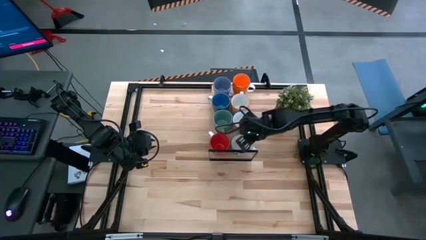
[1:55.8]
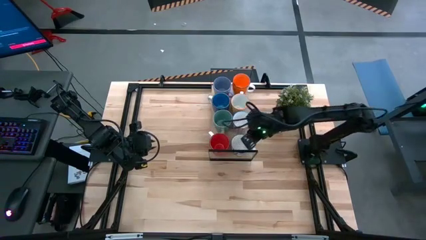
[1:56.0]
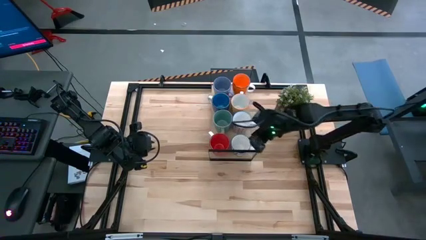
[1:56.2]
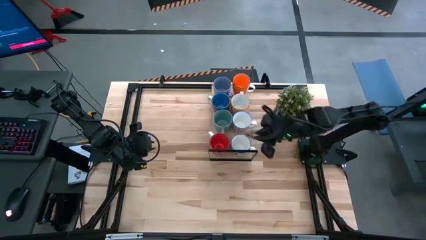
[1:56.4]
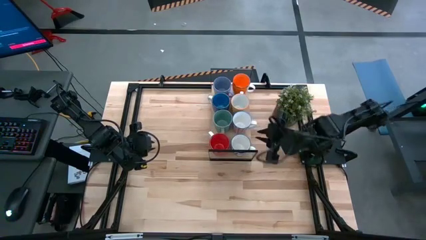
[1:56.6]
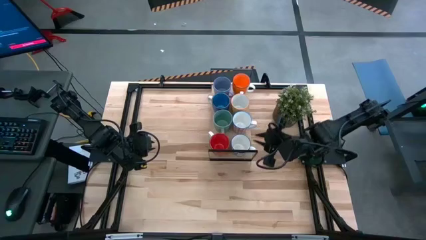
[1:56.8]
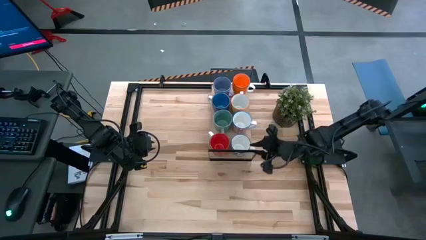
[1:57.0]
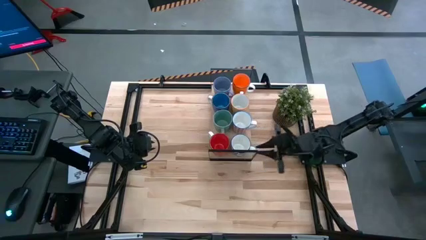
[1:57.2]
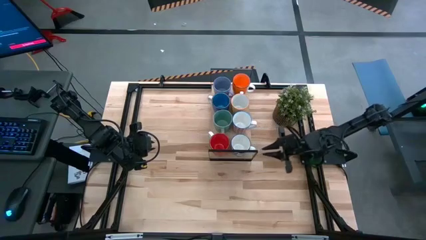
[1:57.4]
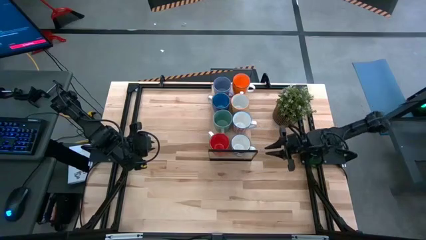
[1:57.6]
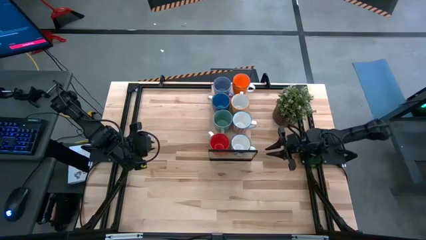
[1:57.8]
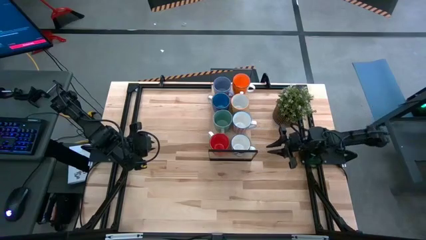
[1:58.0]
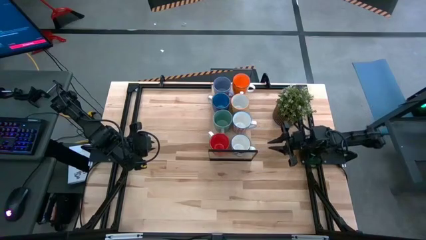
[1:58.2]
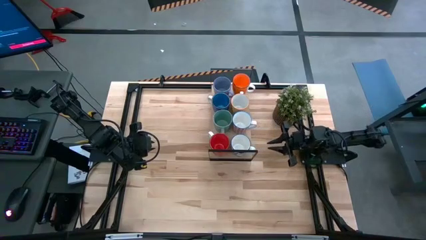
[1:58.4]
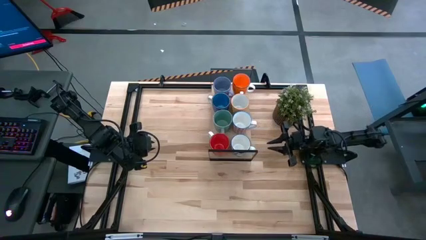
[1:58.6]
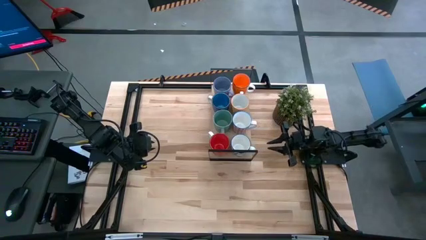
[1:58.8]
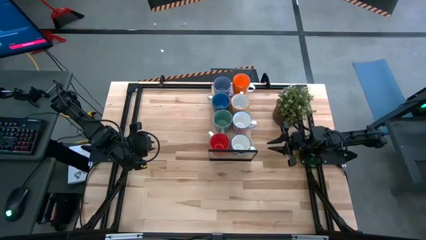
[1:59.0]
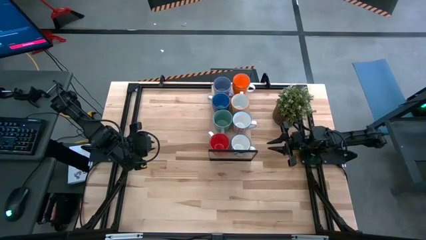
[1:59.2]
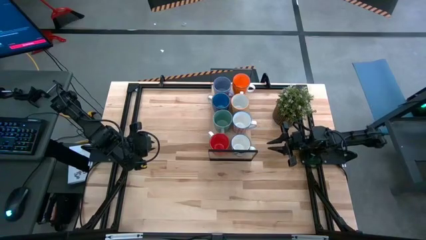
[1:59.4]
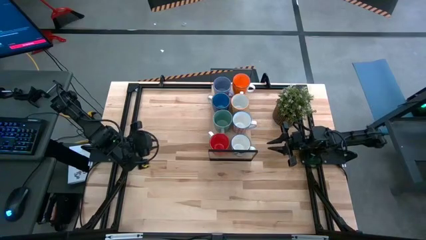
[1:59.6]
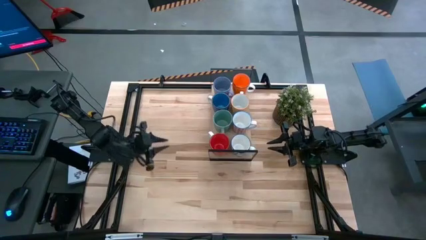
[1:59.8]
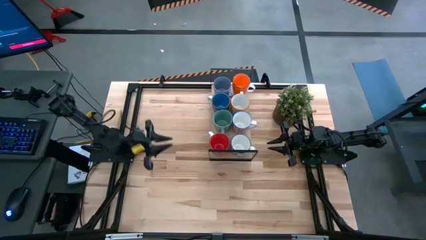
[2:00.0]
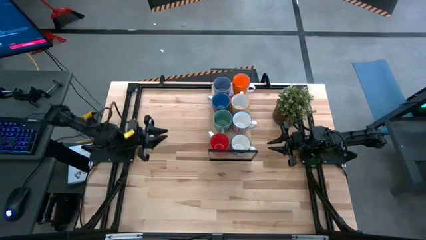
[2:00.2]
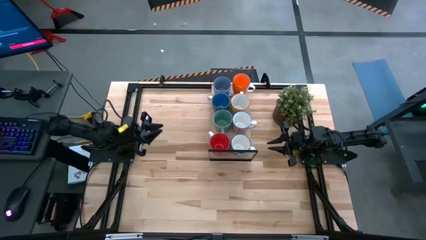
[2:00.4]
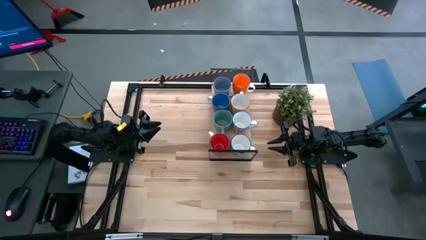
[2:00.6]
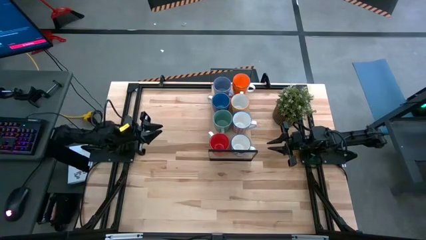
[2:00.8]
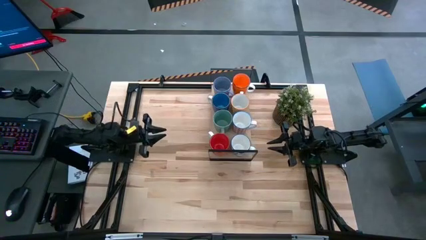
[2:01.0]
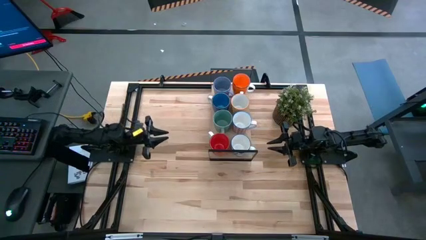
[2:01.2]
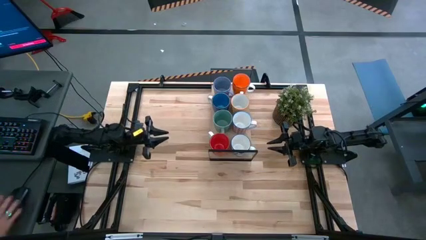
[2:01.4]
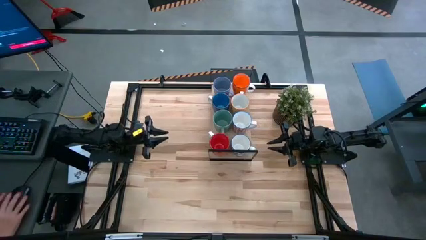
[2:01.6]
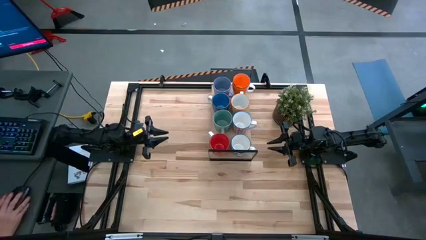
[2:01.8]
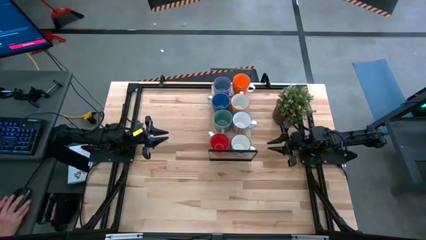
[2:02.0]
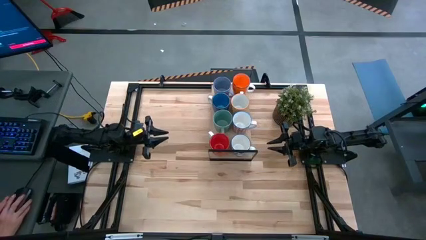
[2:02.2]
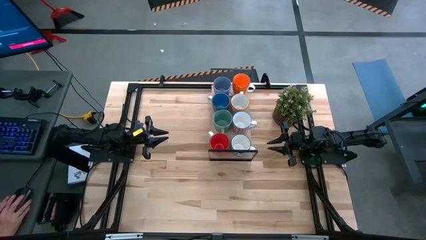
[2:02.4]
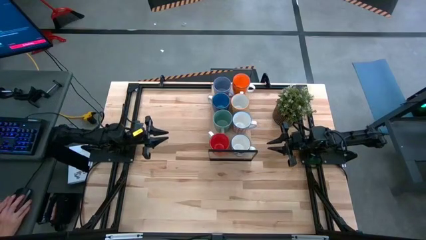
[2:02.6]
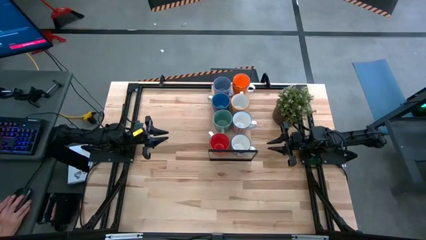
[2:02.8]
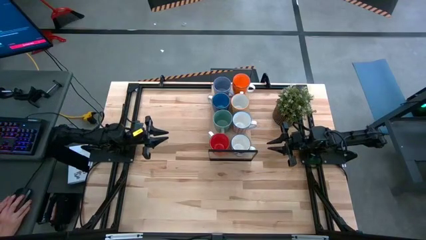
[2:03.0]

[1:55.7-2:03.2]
Task: Place coffee mugs
Return to Home Position

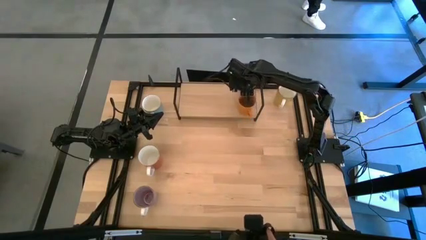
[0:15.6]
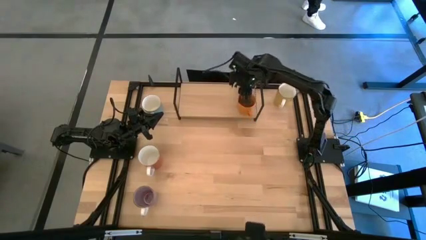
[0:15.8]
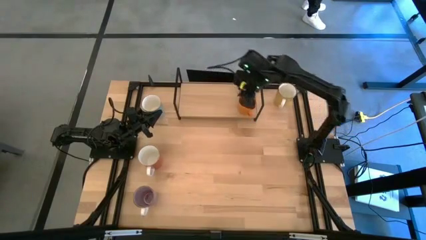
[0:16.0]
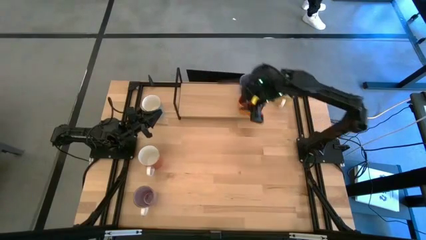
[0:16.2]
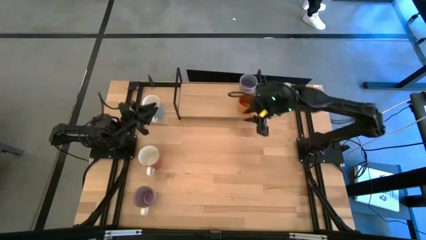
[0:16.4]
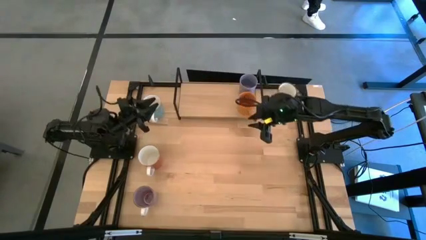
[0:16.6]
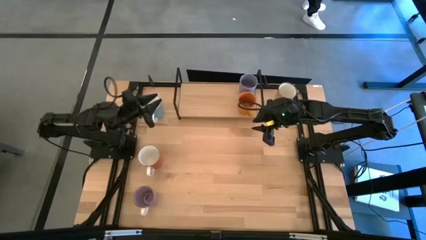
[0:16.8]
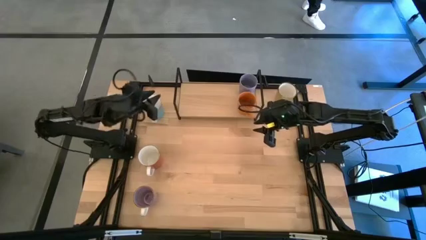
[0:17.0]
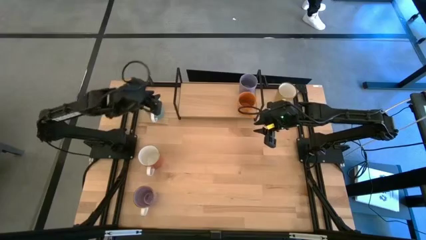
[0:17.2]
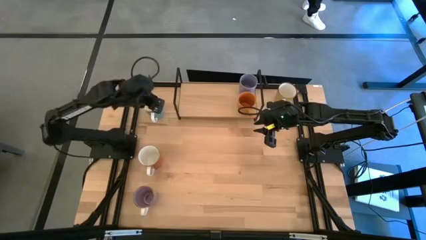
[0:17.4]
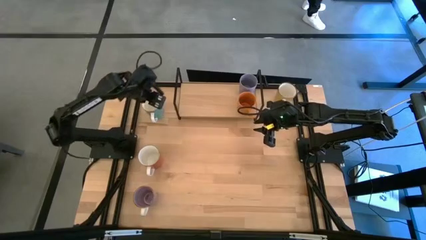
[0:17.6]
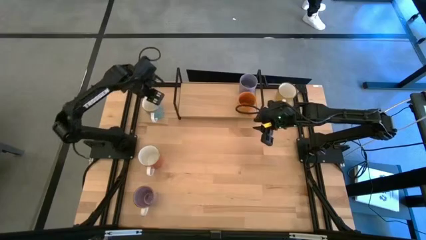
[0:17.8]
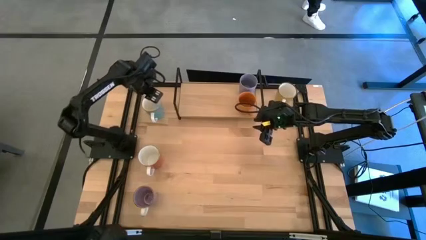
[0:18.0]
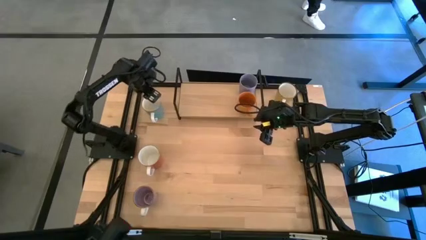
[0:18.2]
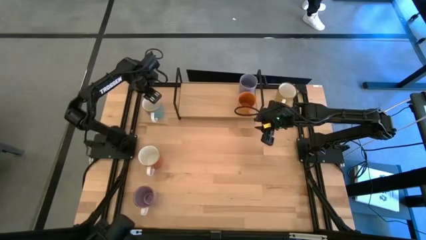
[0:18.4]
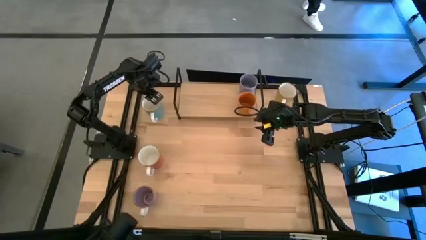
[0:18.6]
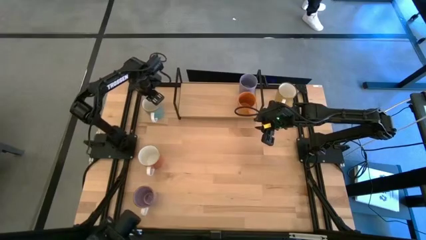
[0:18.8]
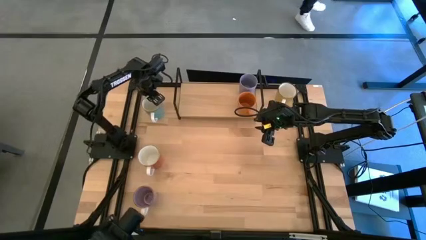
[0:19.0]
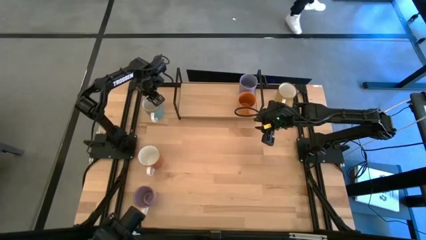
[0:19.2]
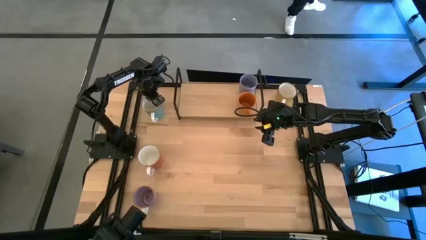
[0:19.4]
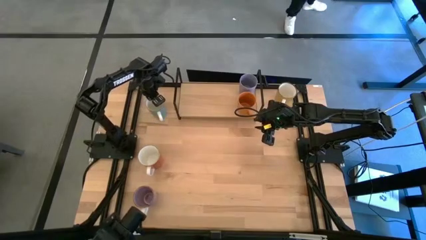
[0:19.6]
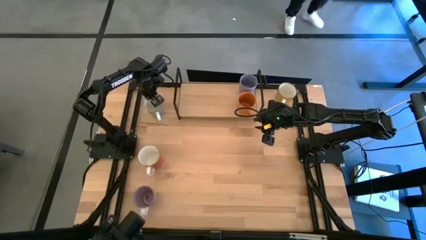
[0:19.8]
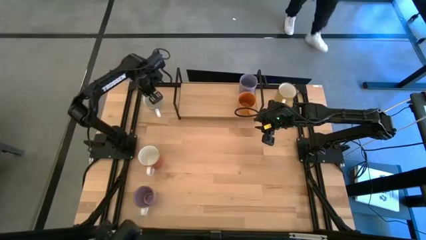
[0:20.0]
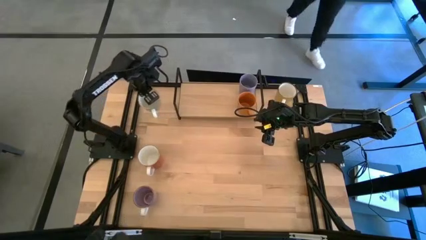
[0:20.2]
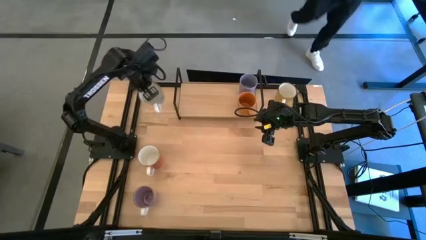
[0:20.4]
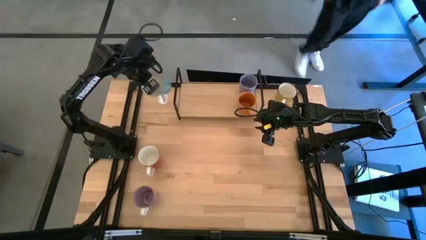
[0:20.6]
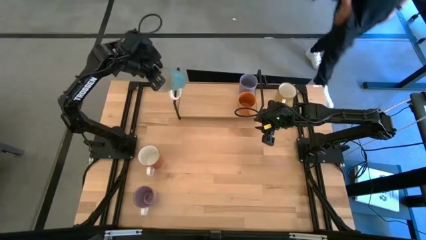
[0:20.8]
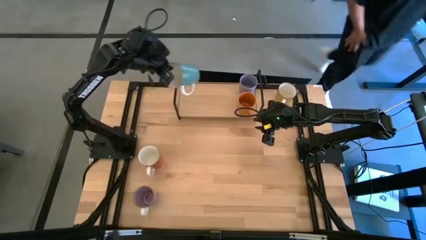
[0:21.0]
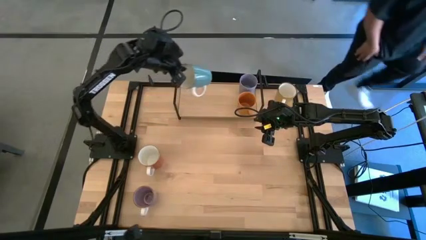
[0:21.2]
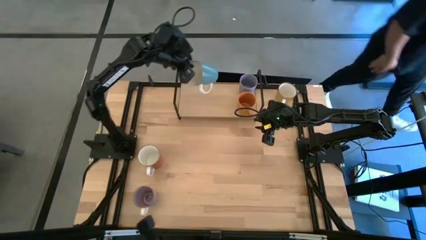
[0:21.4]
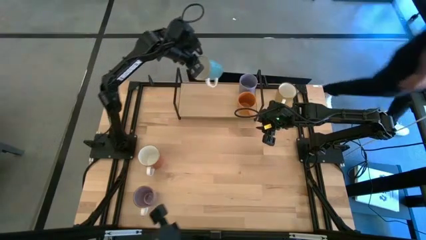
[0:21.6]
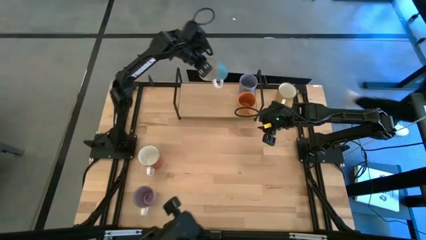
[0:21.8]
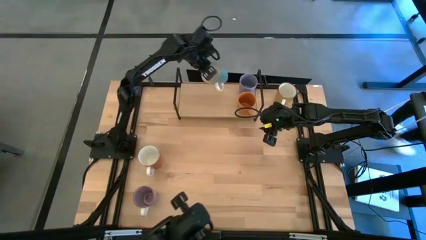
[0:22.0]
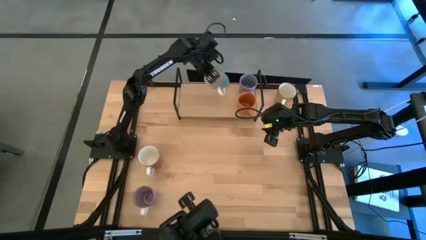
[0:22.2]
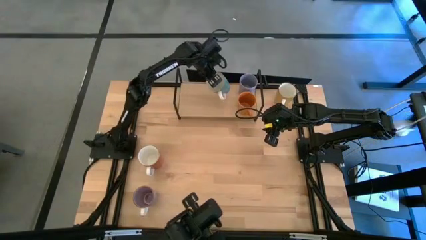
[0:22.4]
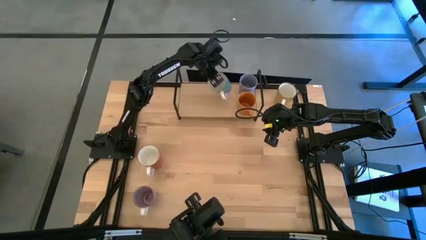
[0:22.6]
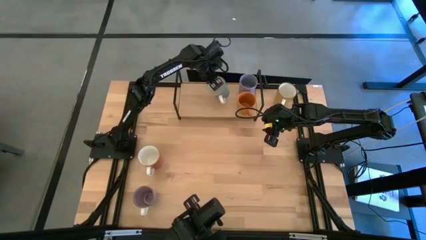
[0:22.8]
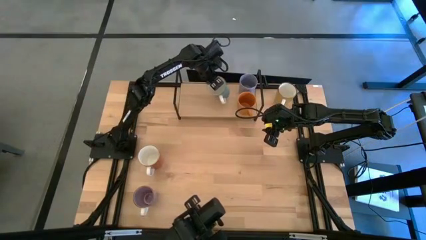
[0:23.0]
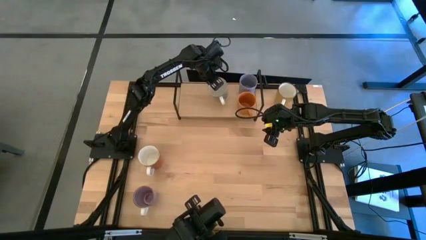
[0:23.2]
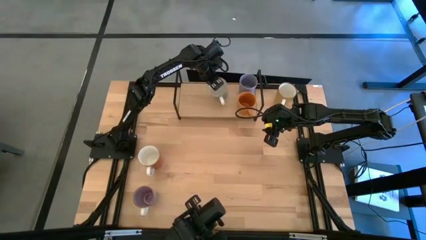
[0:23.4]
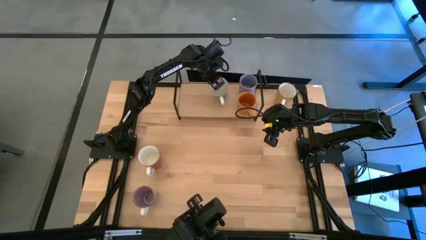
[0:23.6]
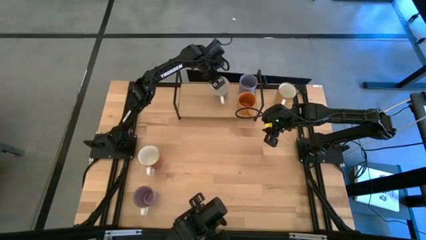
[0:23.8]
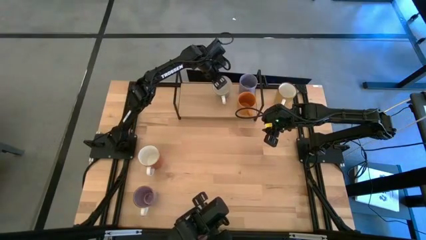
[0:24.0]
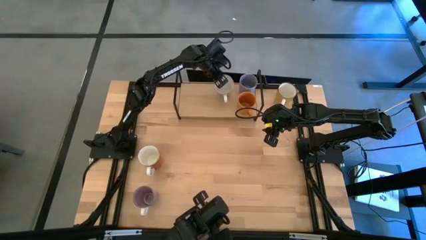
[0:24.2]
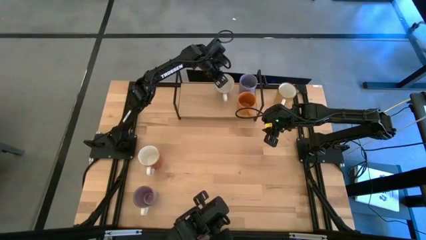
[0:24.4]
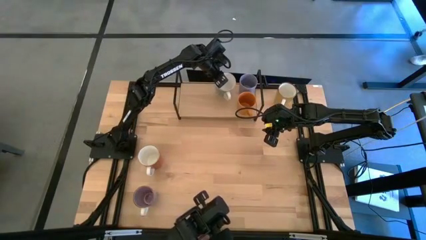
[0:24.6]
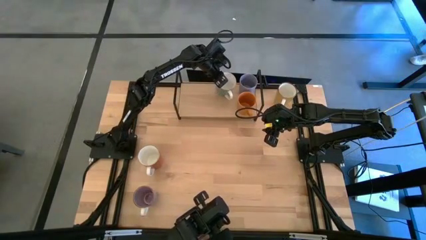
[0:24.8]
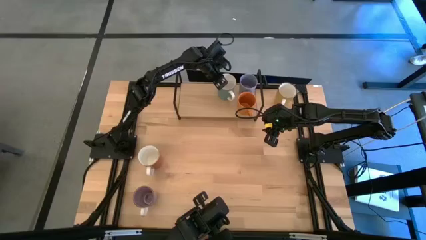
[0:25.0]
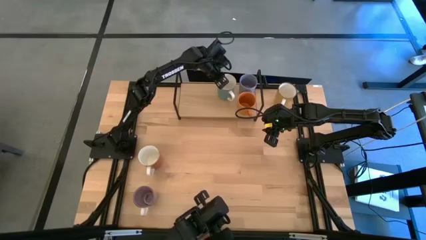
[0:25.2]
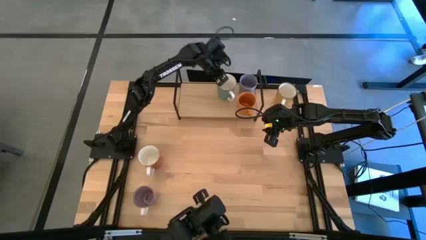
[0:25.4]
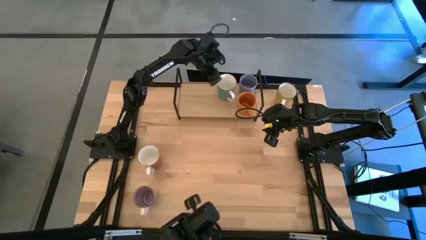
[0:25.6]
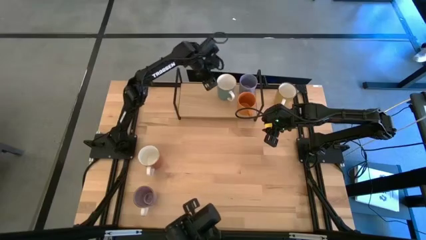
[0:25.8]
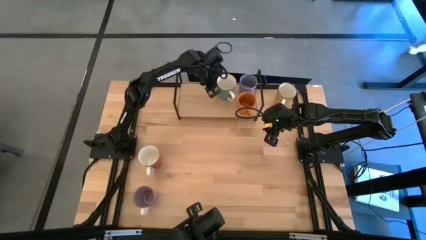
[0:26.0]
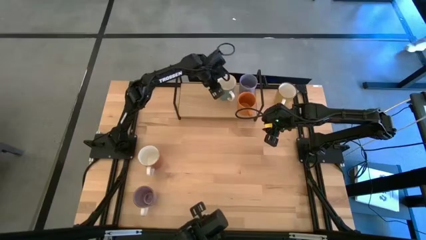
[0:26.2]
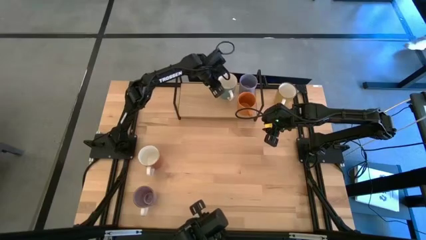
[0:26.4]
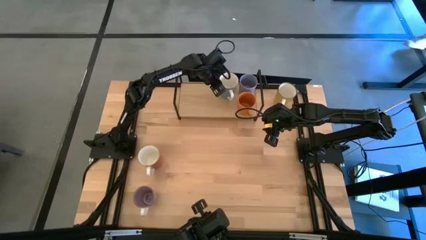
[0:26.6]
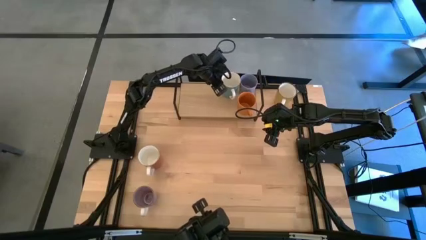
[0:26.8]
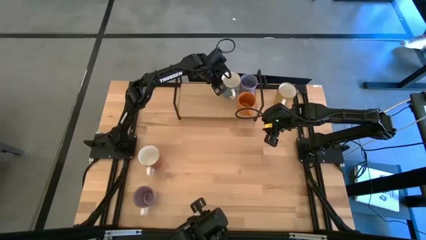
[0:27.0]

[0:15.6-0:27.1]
Task: Place coffee mugs
Put the light blue mug on the shelf
